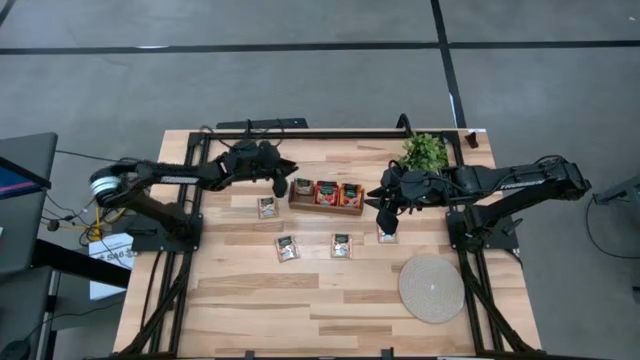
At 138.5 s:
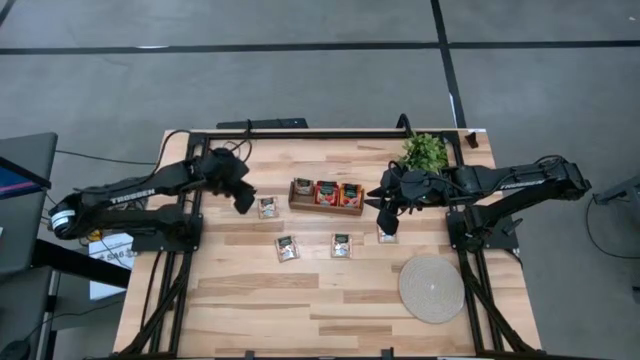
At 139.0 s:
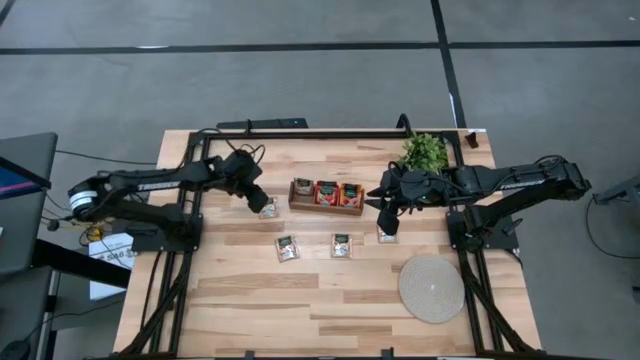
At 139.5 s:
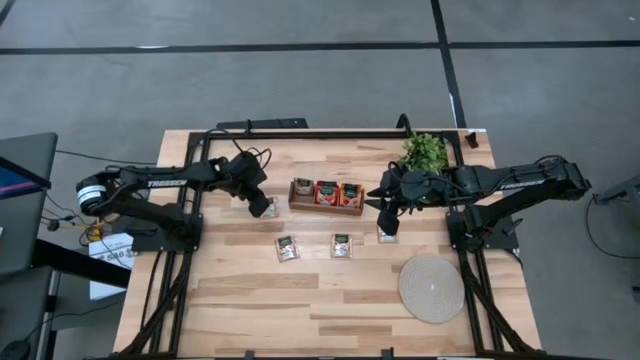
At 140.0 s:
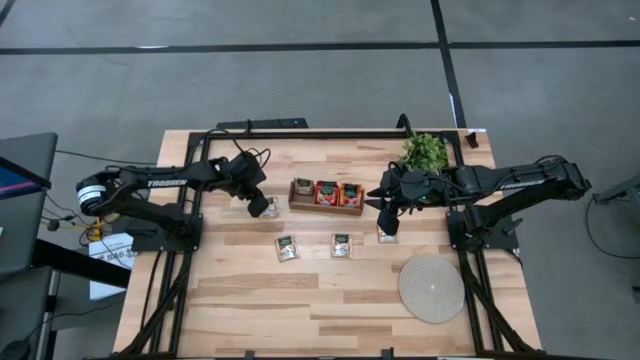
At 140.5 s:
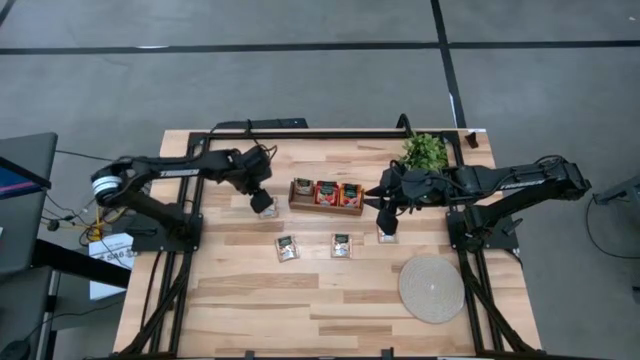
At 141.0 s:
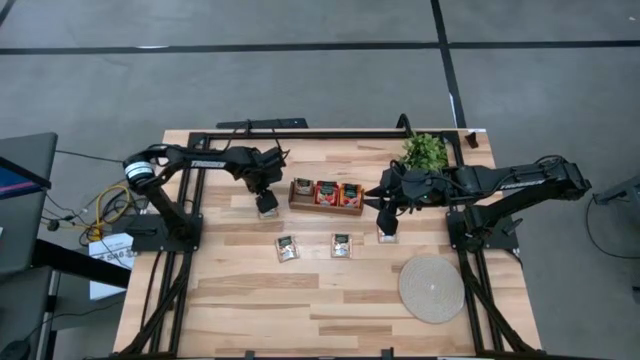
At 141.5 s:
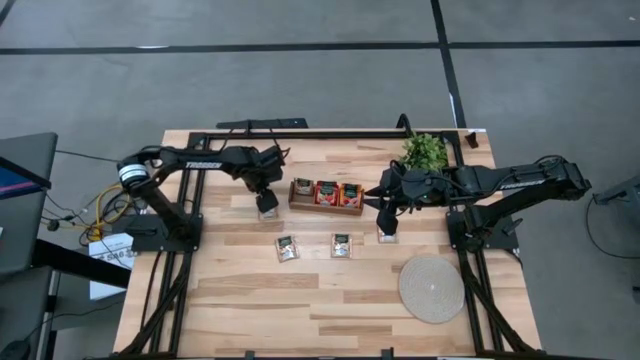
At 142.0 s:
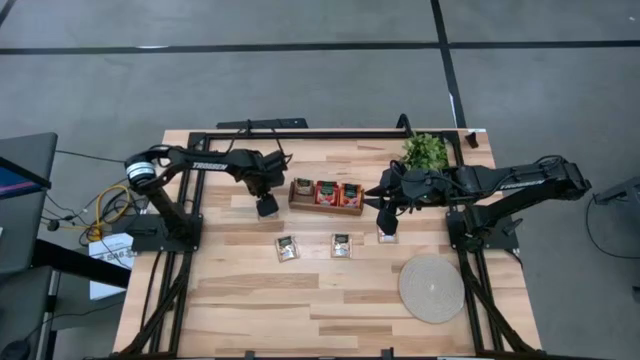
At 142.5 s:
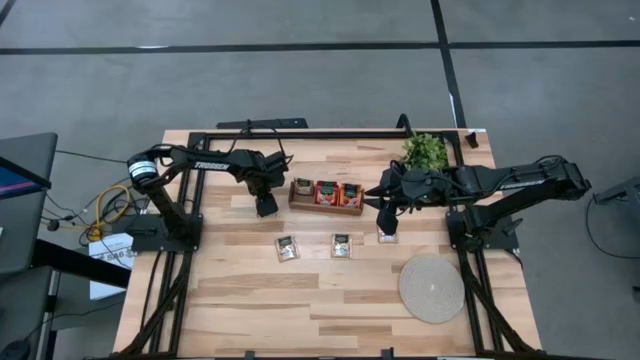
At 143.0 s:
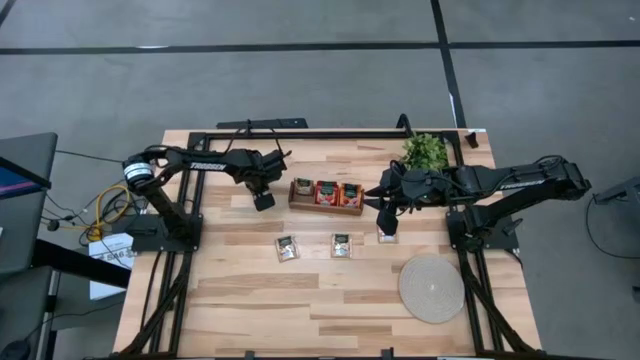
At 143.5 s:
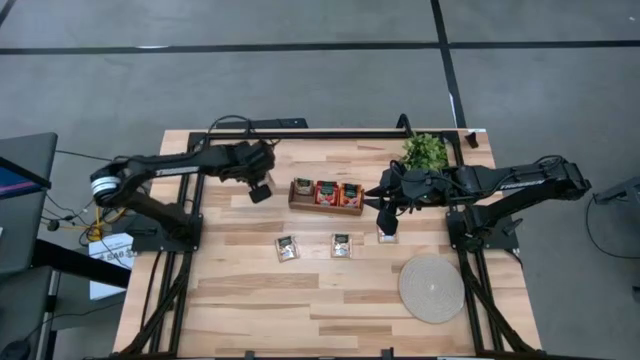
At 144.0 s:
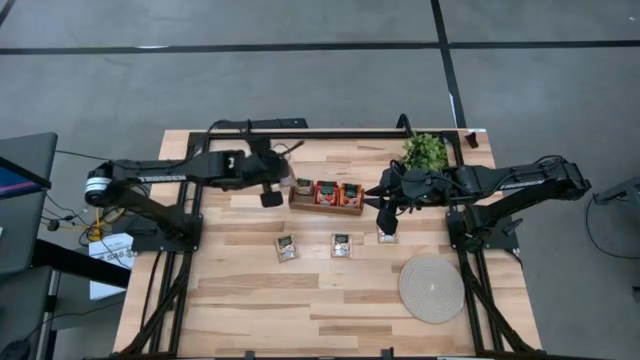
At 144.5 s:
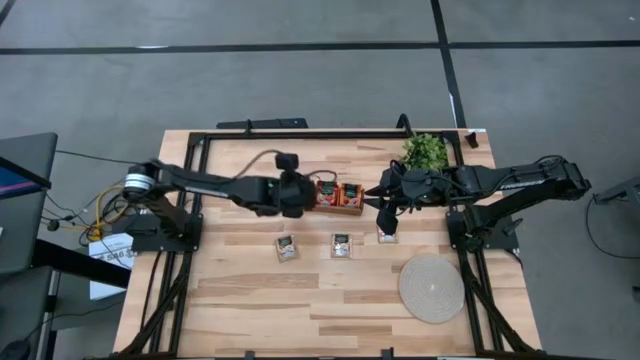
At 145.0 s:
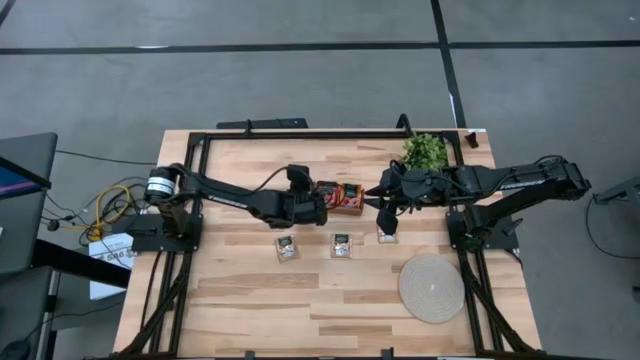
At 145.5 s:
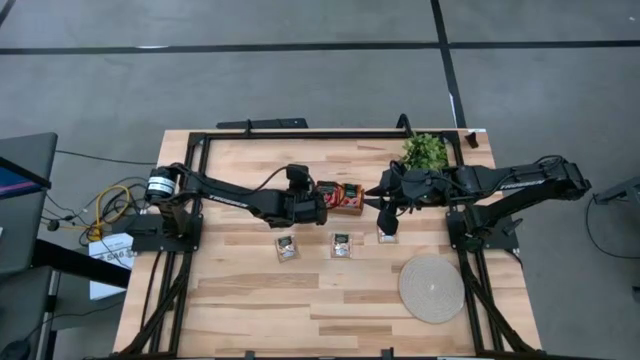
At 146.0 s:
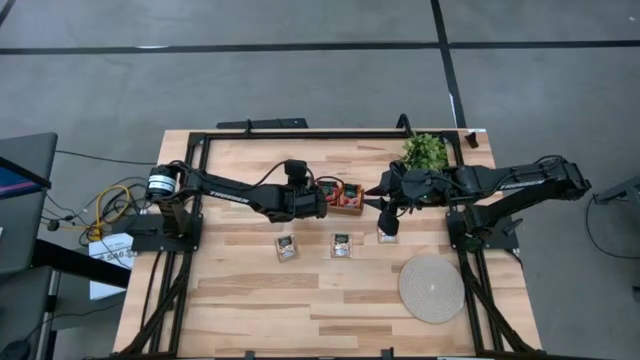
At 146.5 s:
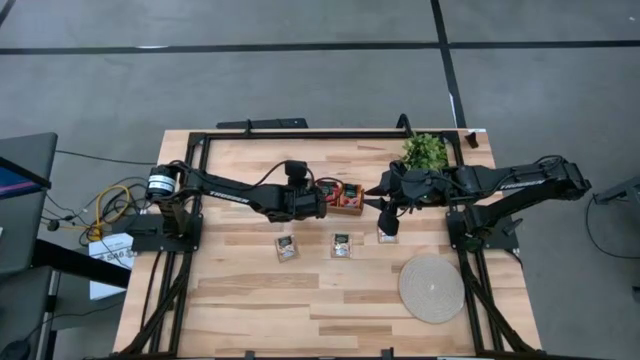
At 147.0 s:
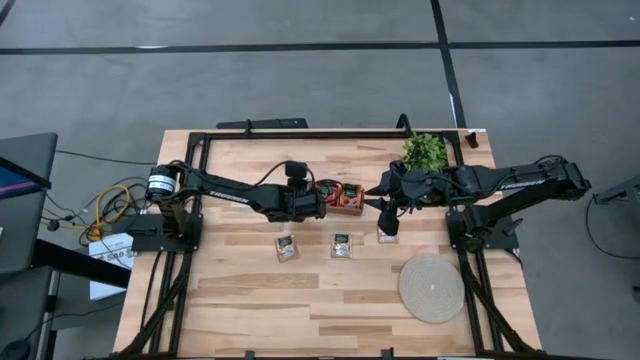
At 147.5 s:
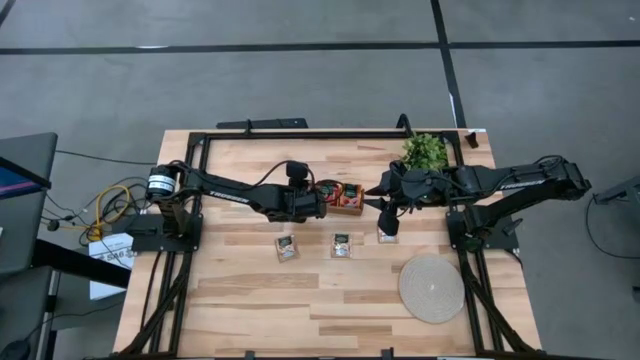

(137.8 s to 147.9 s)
Task: Pick & Place Tea
Put the brown tea bag into the left section of the wooden organizer

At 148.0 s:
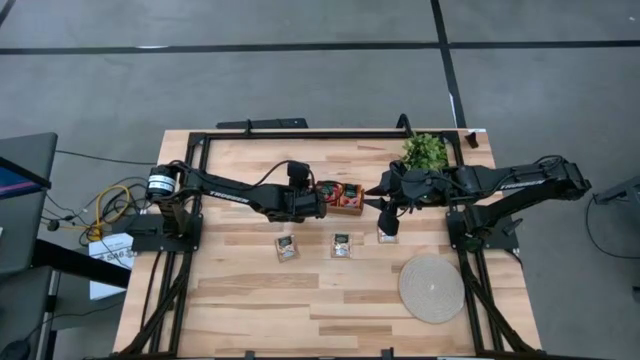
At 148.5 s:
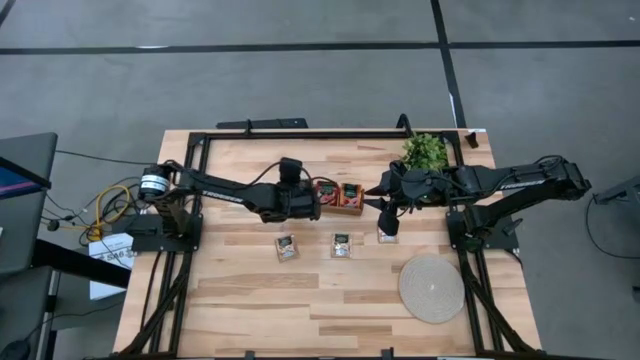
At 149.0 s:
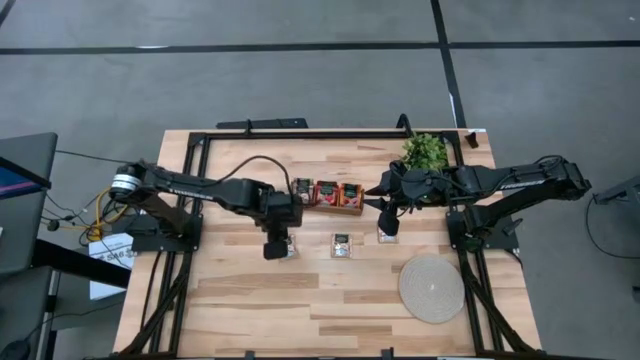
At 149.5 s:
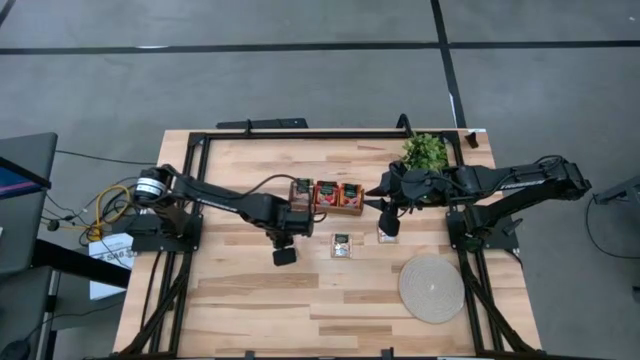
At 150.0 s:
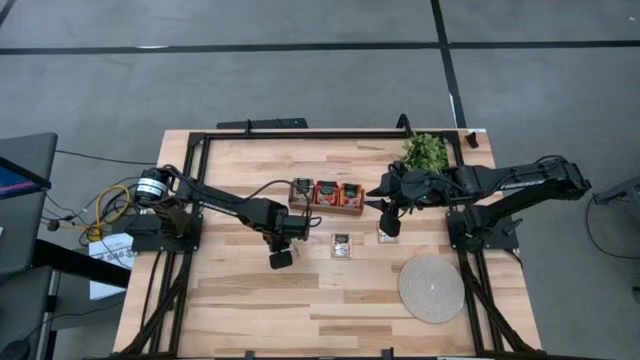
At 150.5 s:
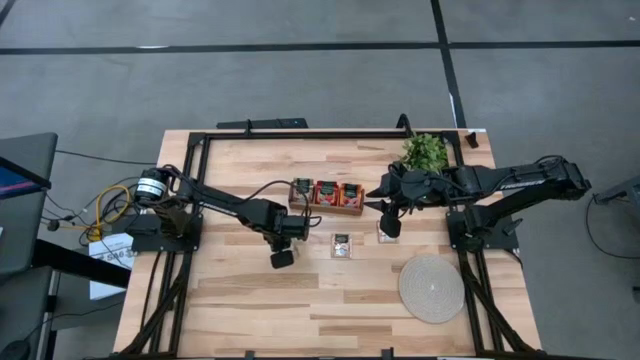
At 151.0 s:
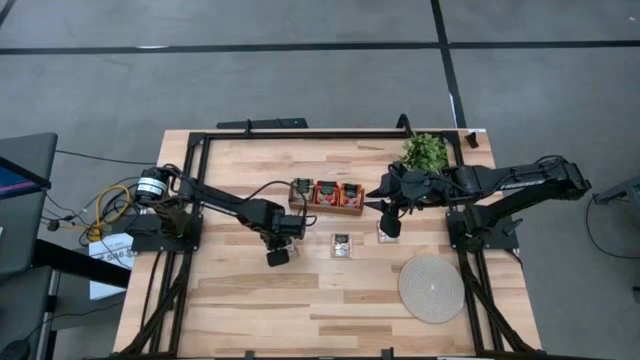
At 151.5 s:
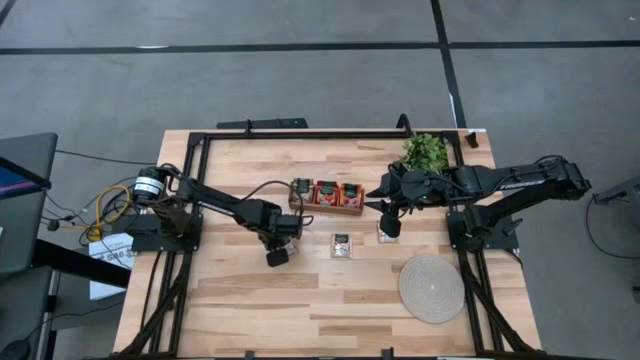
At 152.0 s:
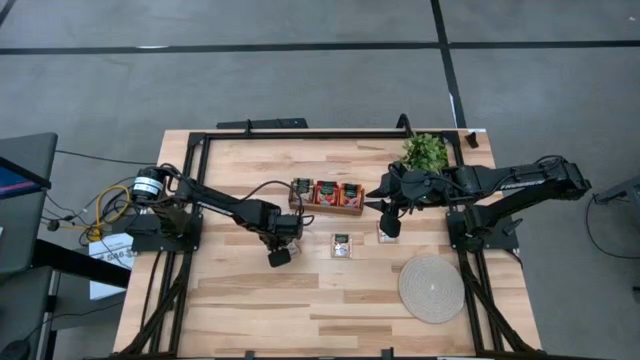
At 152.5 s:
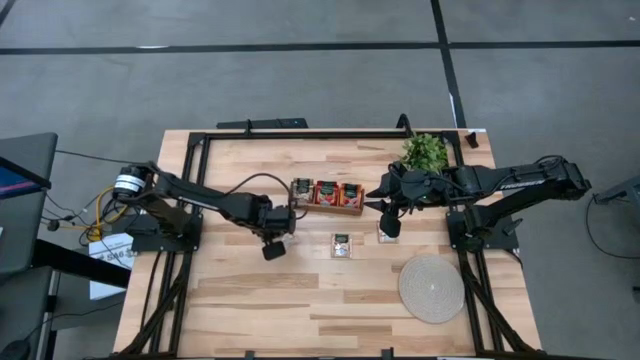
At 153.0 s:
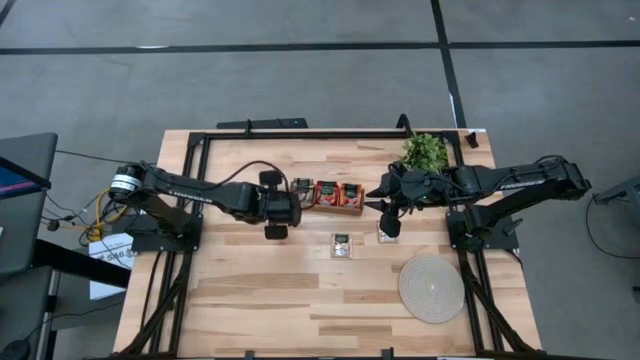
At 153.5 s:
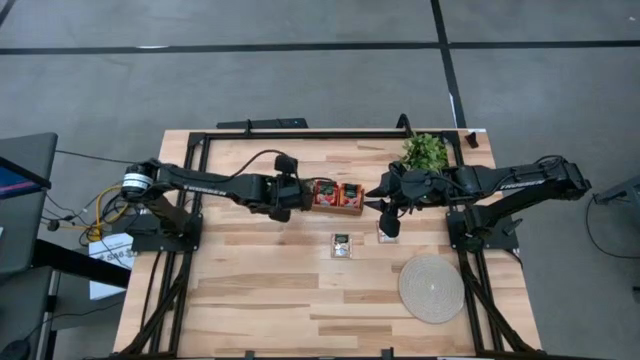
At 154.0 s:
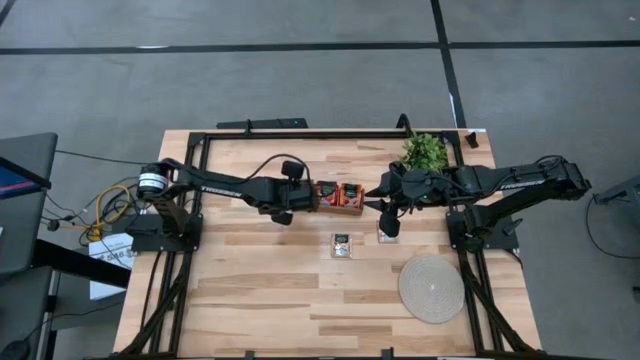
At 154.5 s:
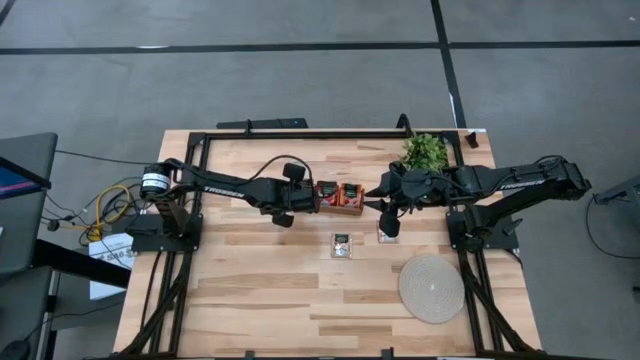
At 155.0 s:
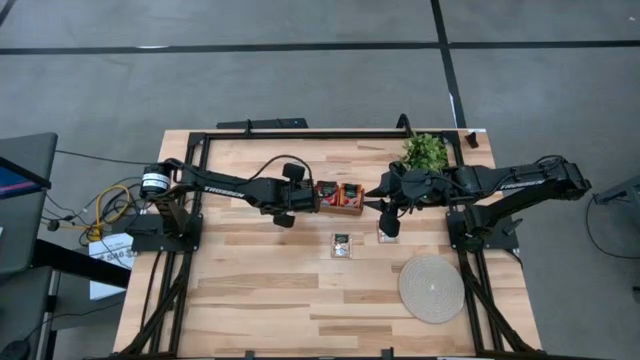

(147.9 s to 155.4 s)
Put the brown tea bag into the left section of the wooden organizer

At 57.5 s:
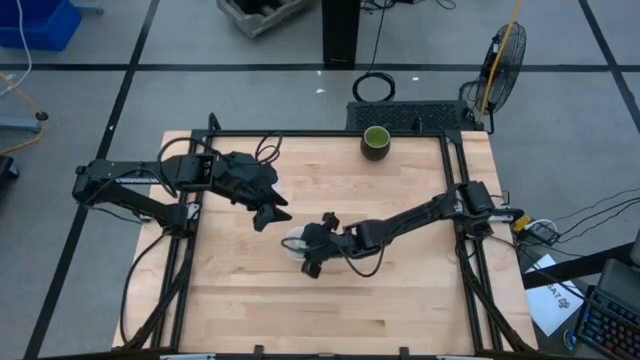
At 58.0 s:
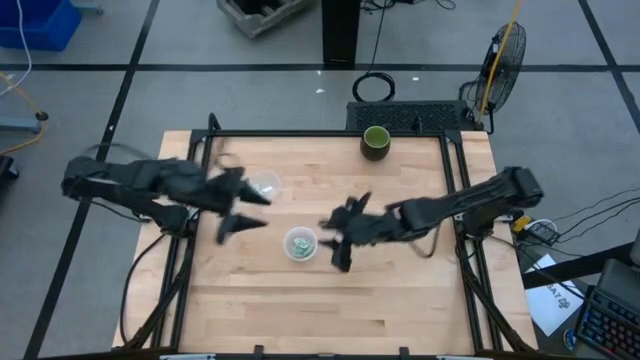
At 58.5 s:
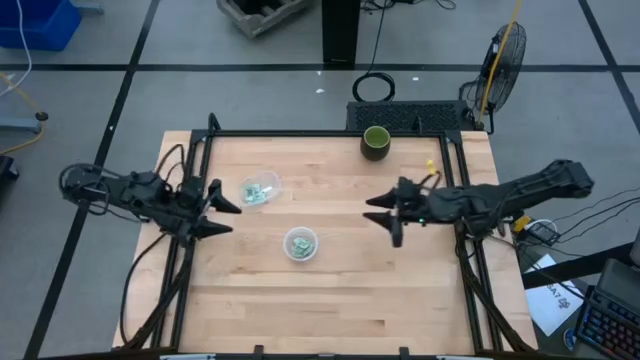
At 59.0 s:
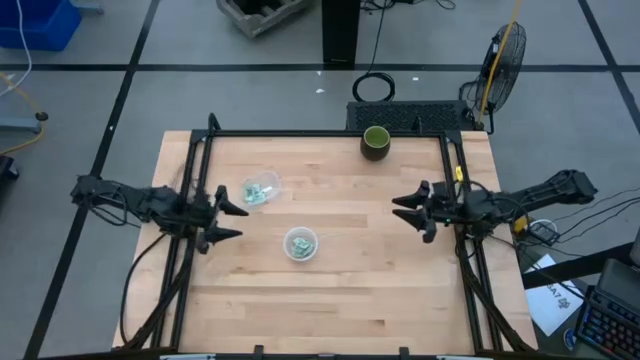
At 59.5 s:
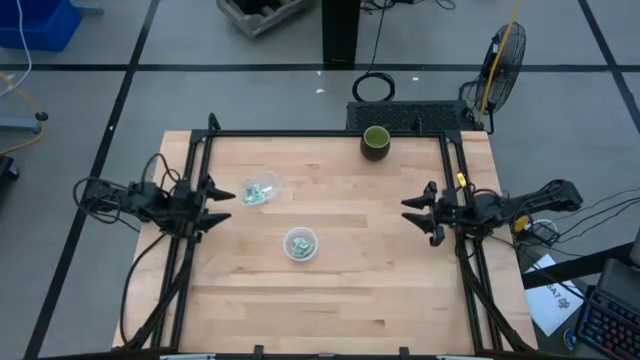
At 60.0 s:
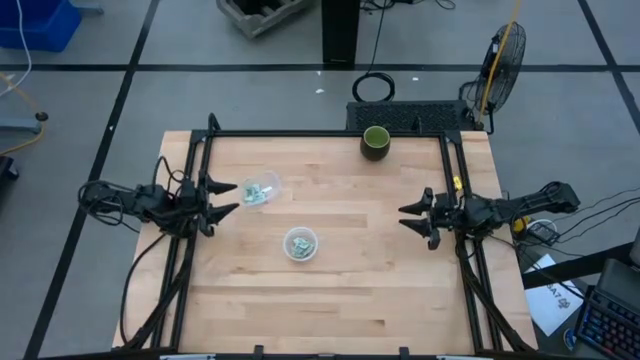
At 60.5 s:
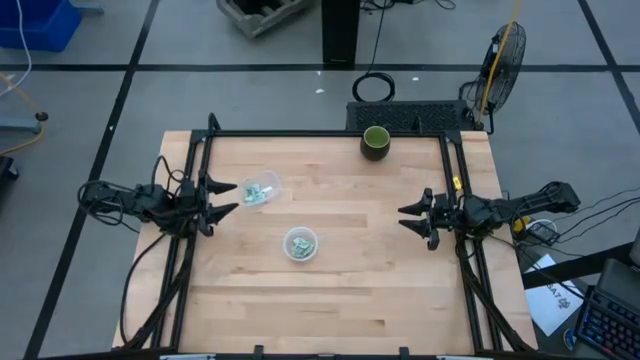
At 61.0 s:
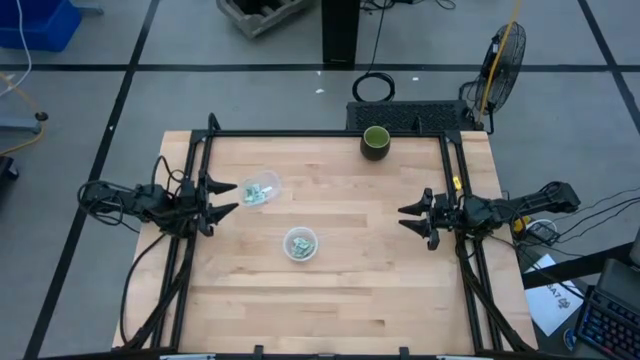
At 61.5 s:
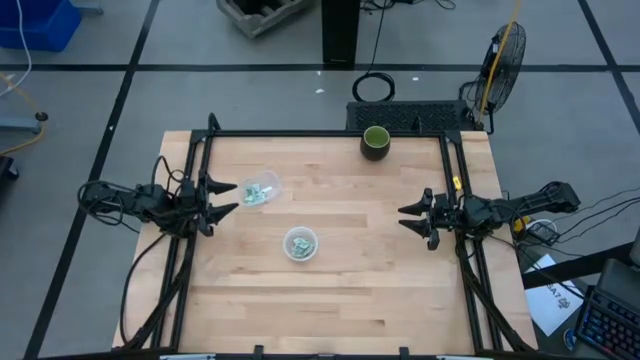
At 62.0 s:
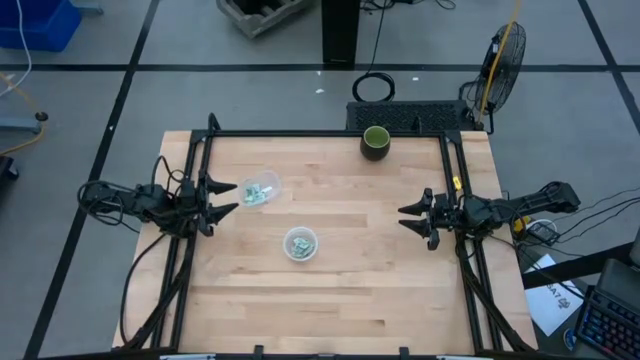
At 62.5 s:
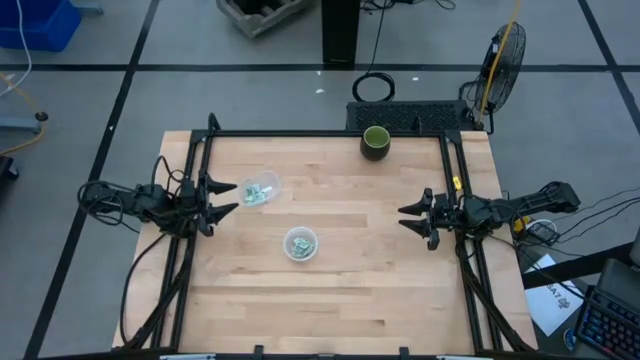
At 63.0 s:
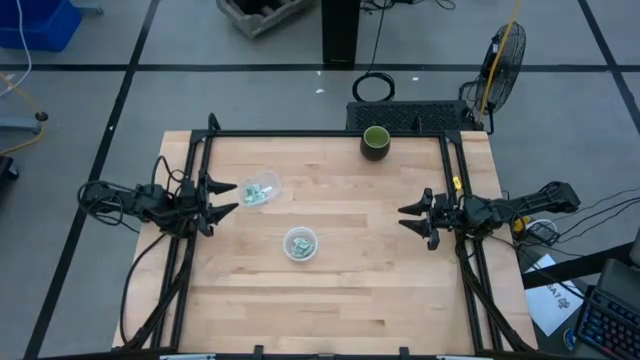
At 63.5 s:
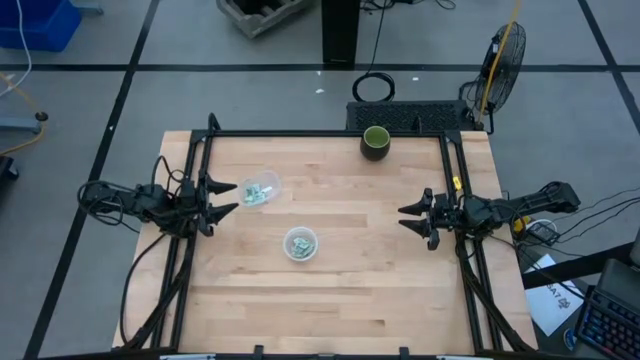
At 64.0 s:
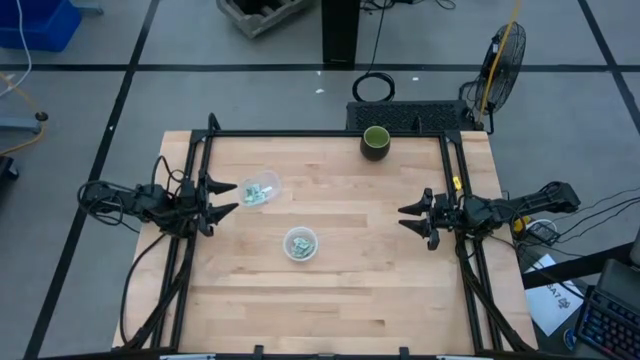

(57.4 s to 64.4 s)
Task: Pick and place items into bin
Return to Home Position
